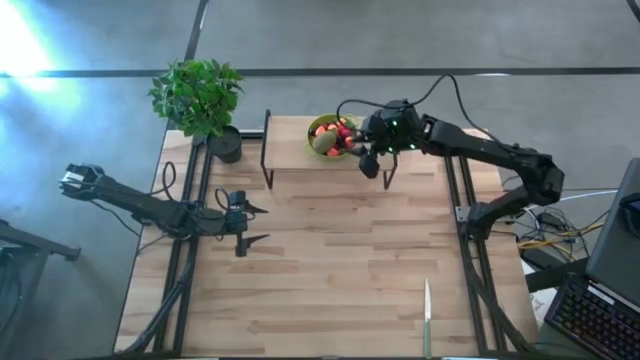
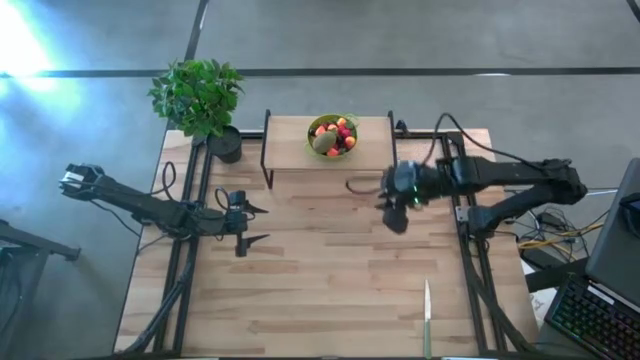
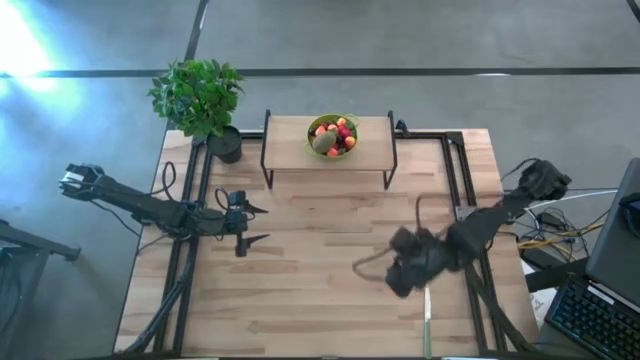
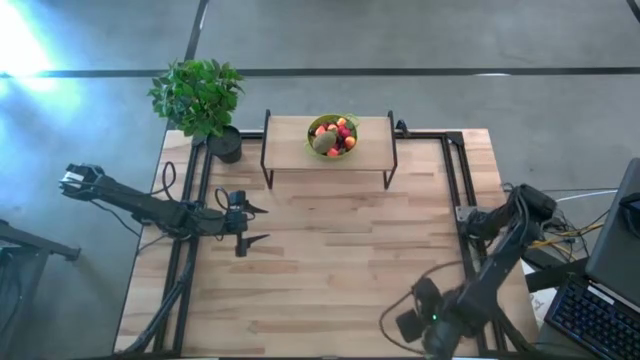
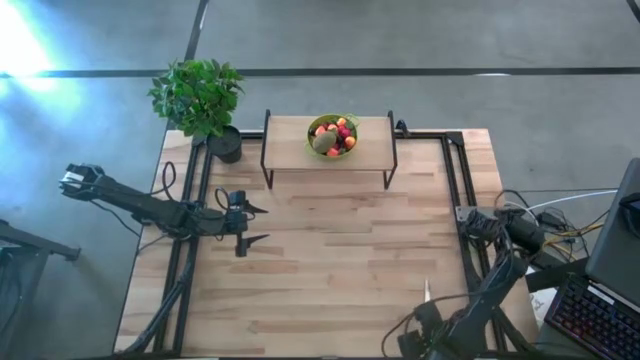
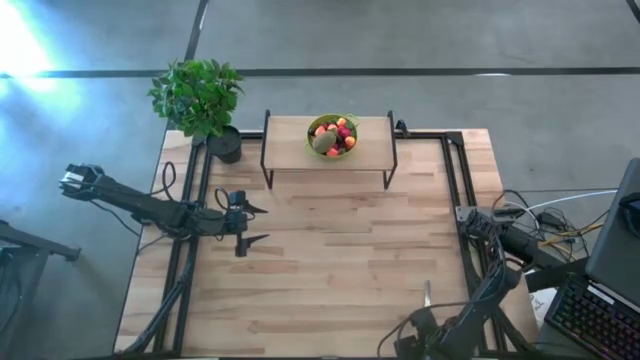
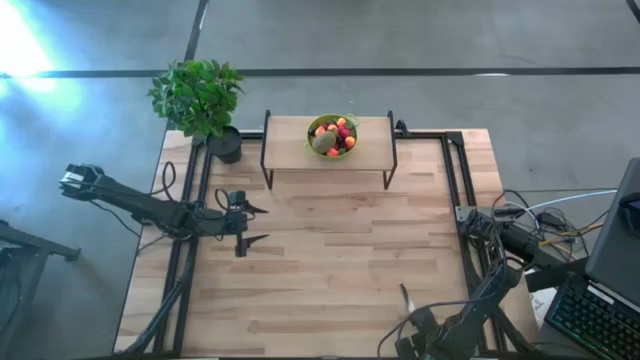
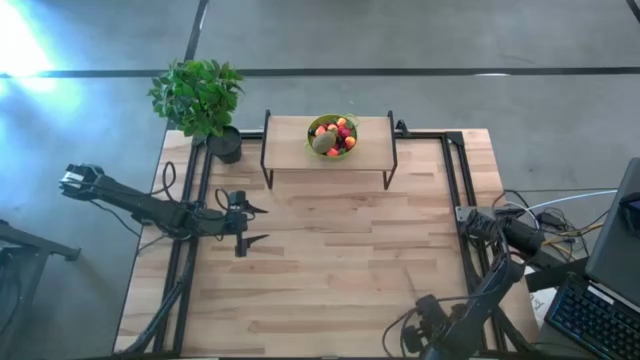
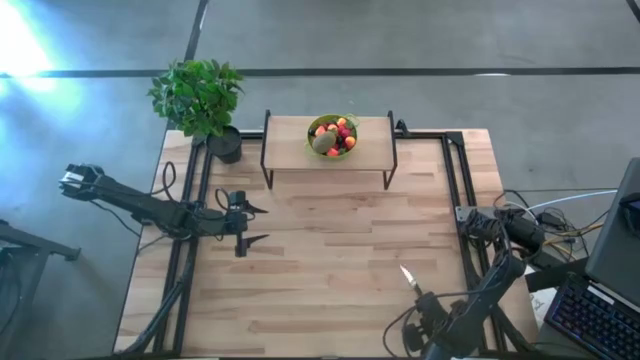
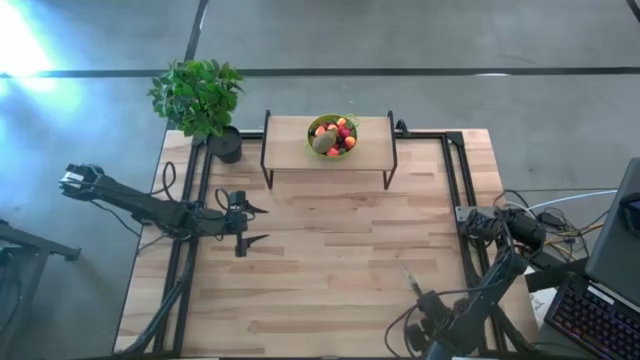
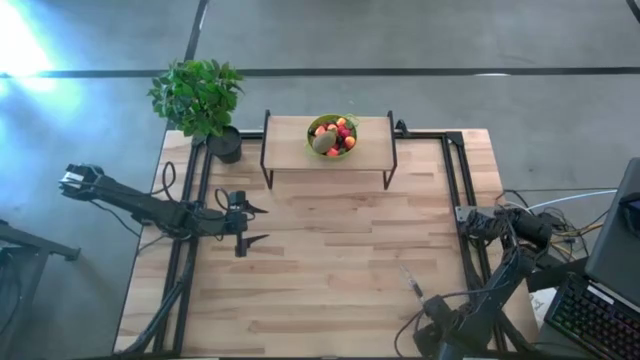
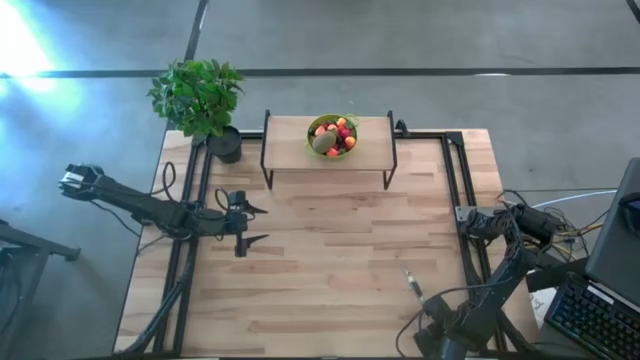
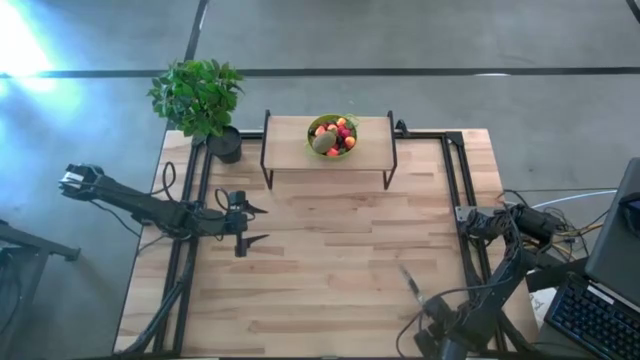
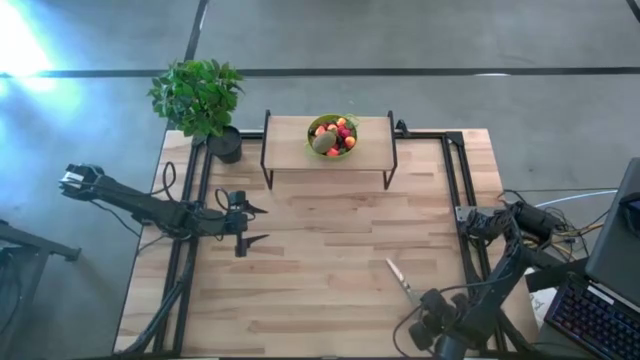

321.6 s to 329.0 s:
Task: Pick & Place Fruit
Put the green knife on the shelf

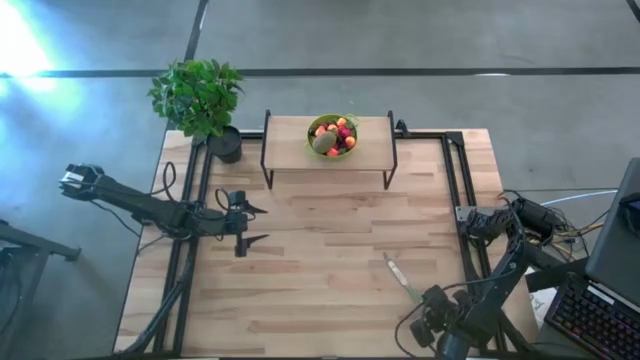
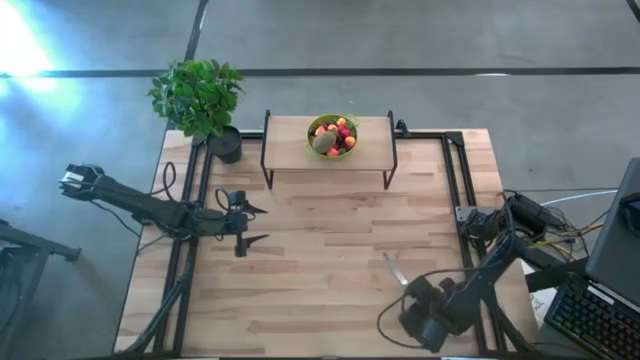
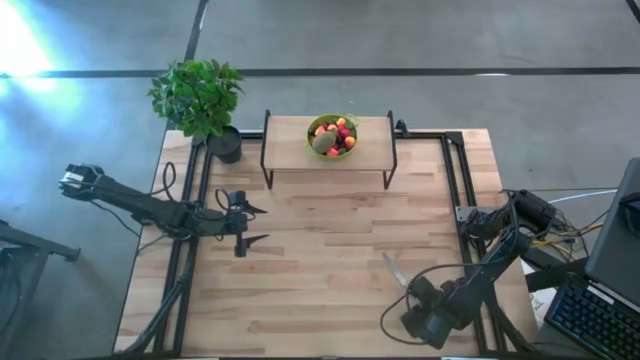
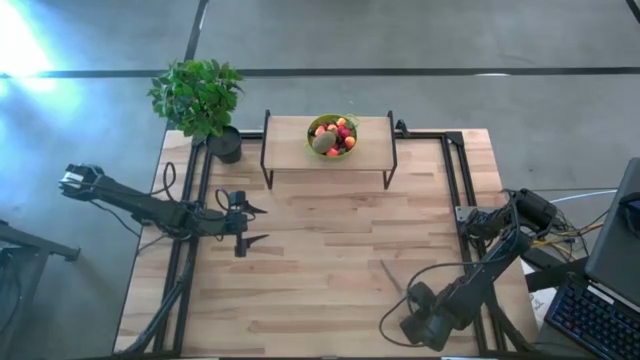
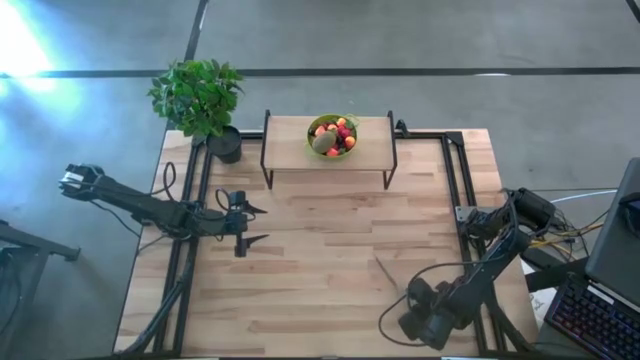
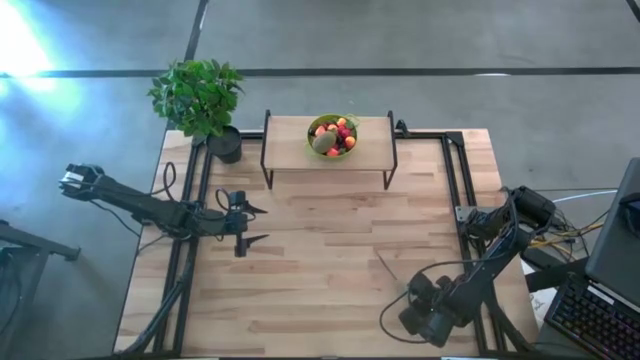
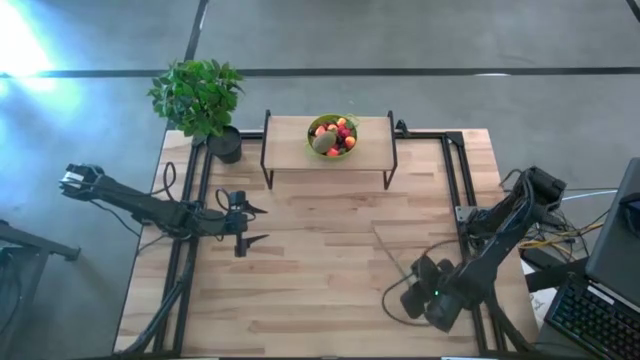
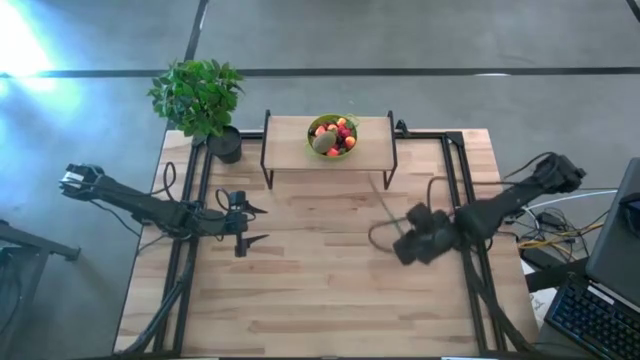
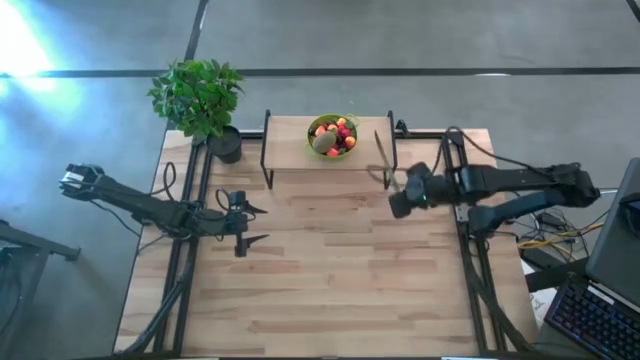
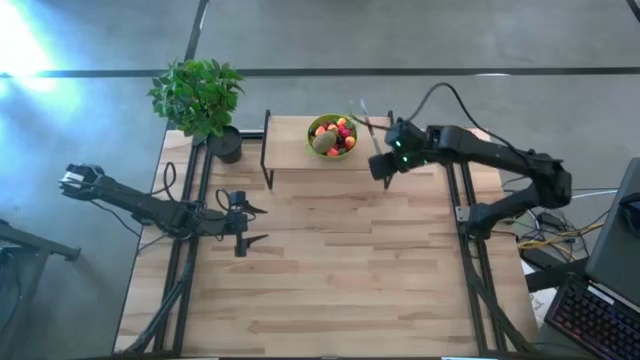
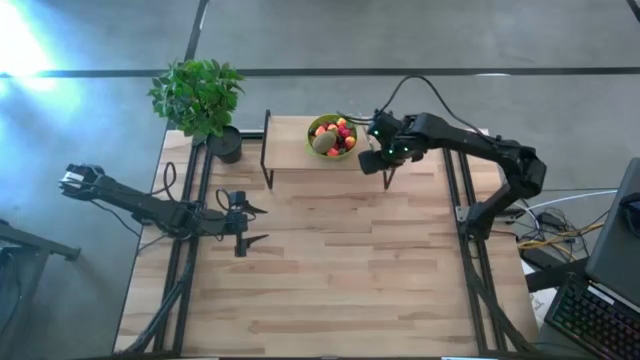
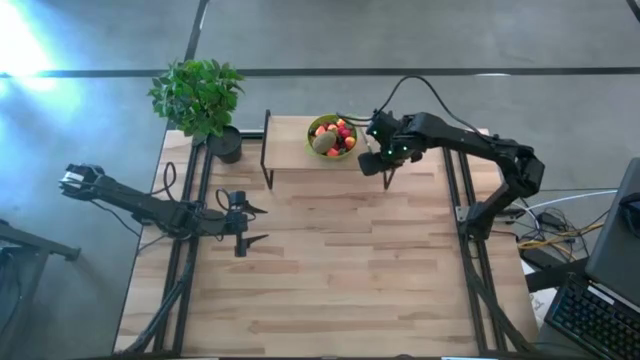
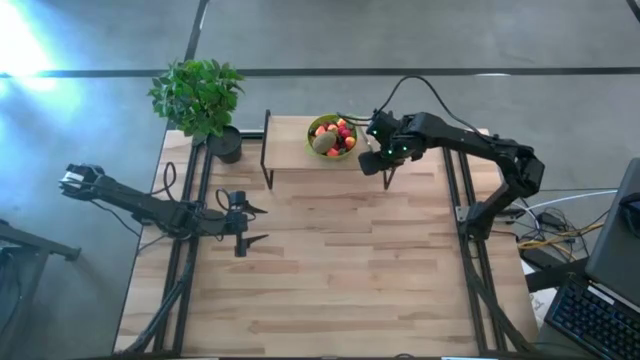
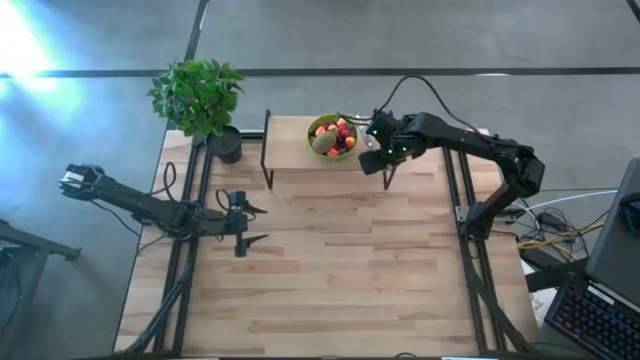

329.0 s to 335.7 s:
Put the green knife on the shelf

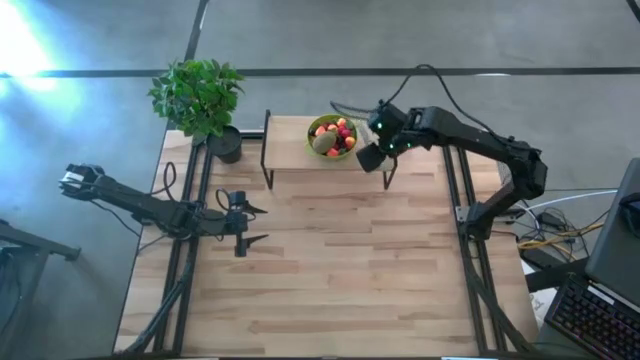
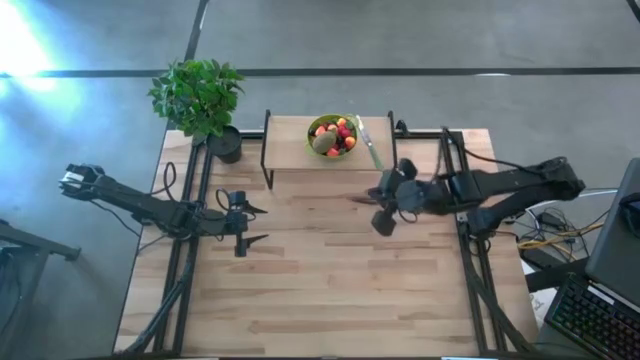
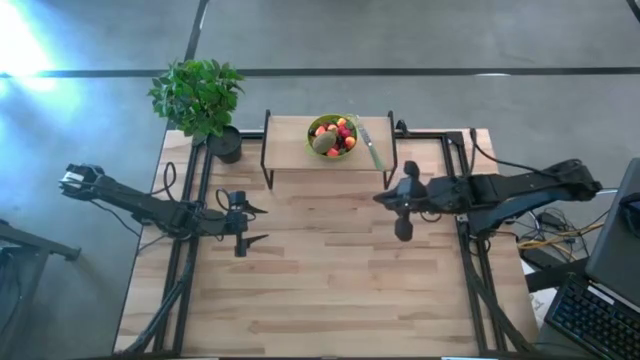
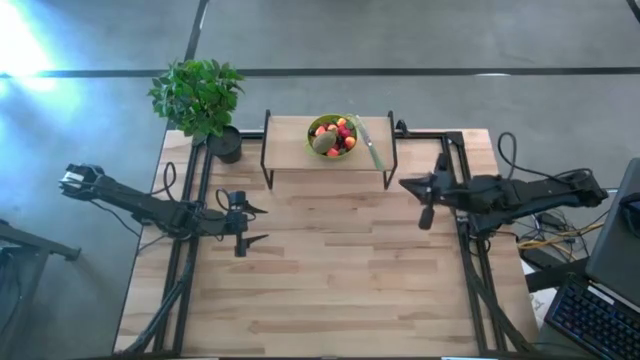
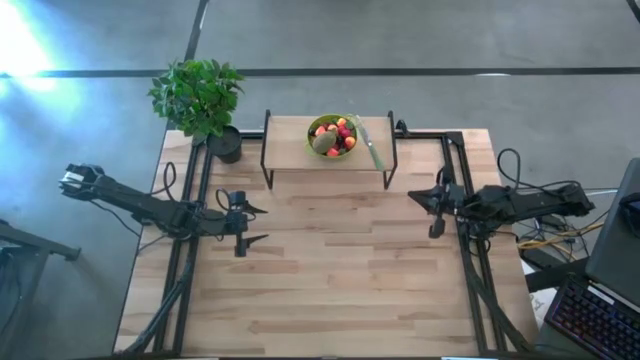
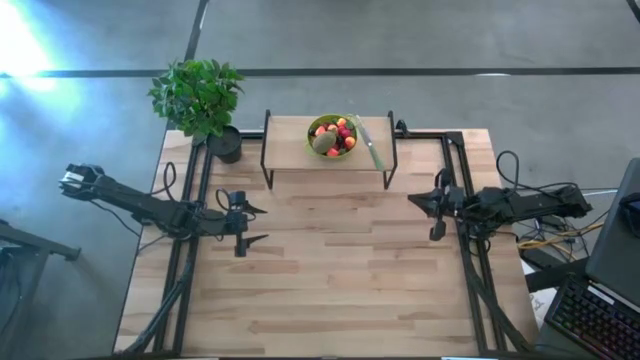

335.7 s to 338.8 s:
Return to Home Position

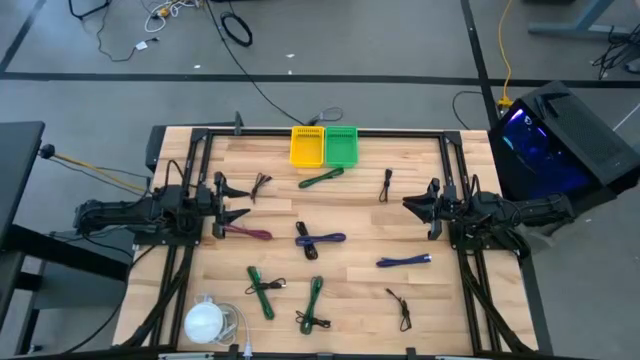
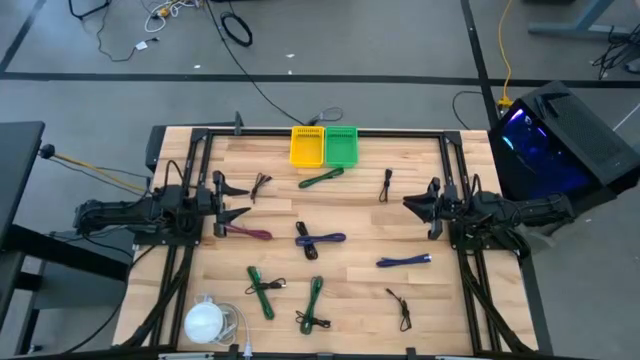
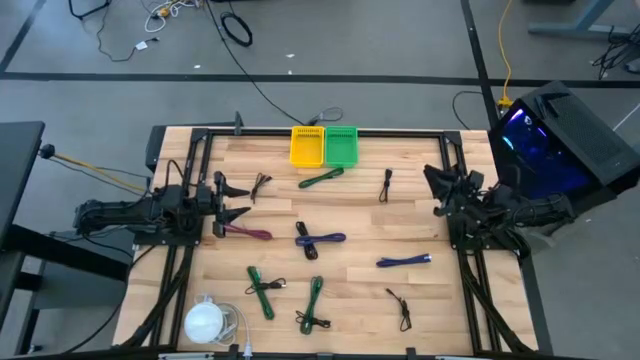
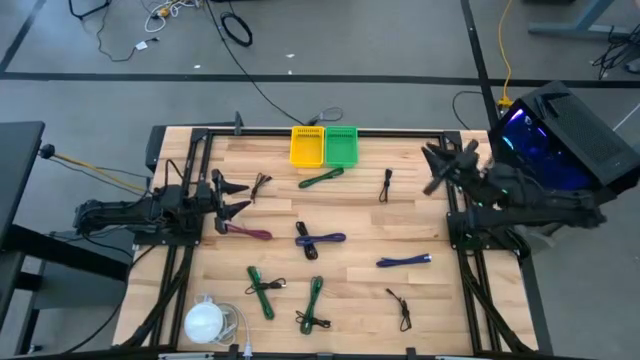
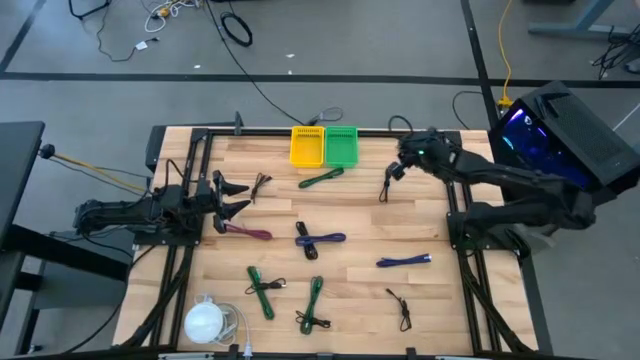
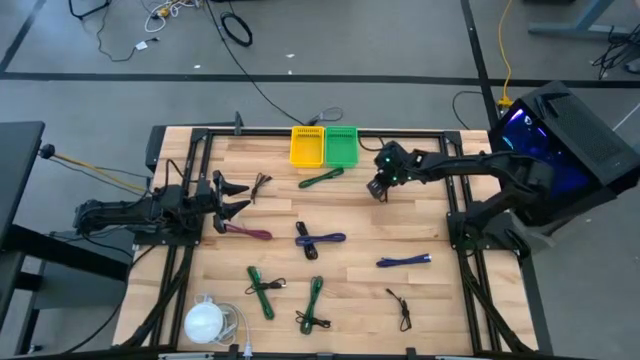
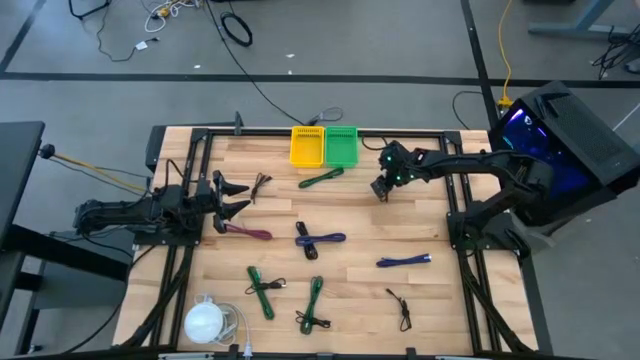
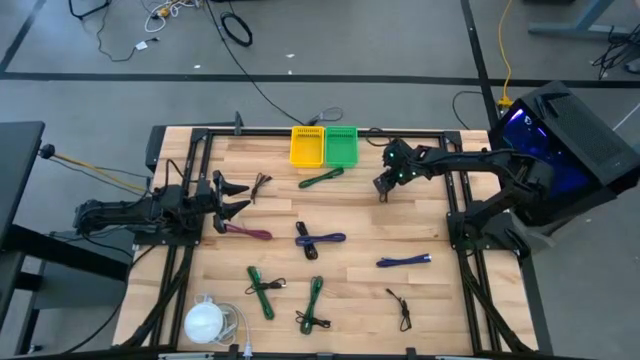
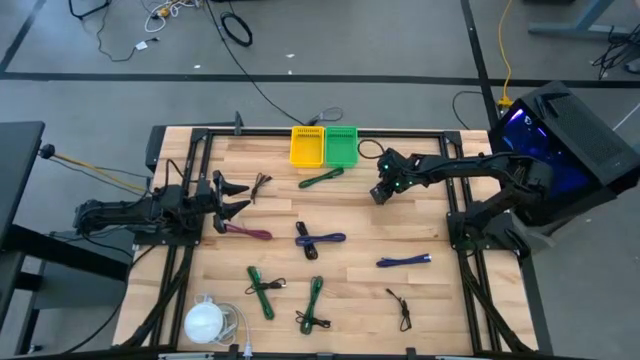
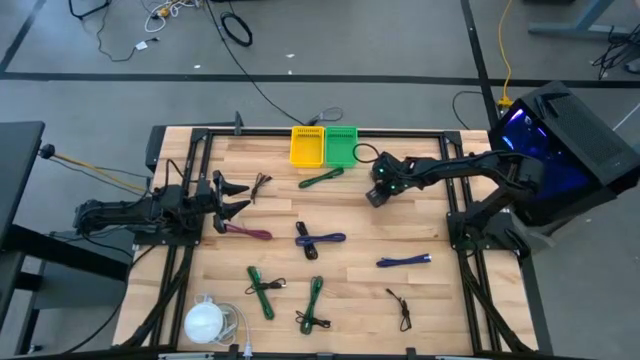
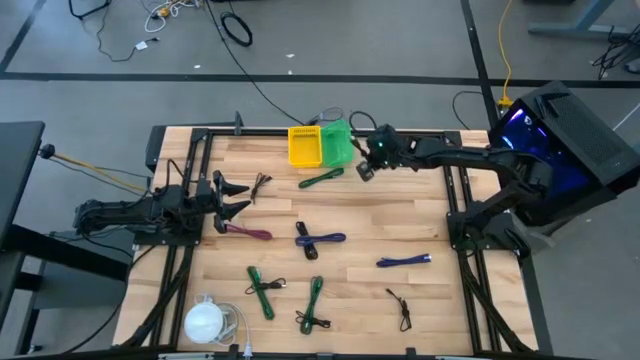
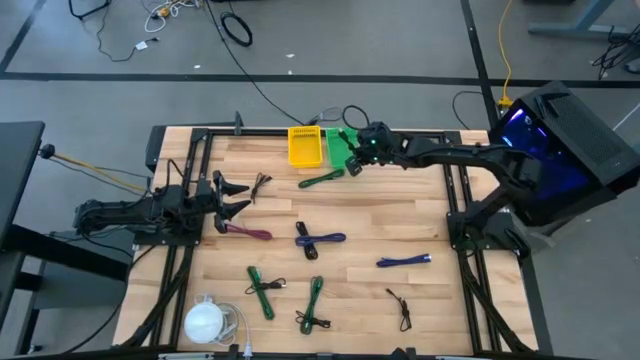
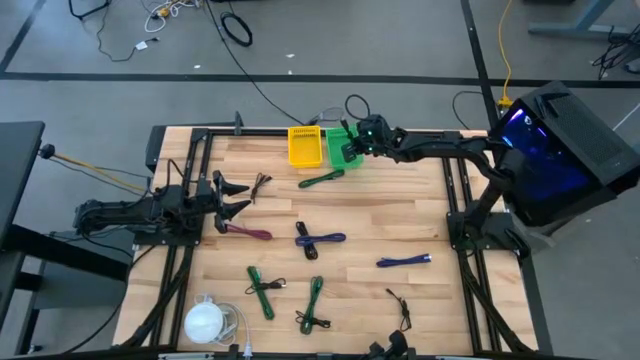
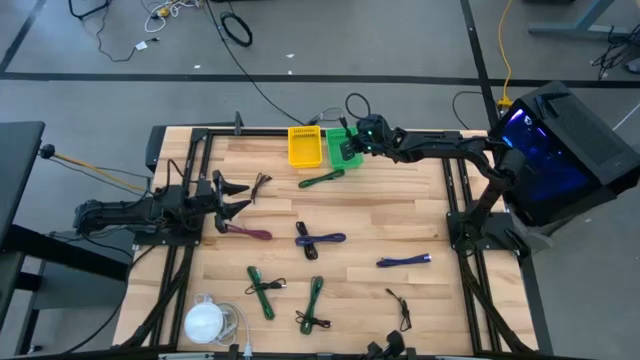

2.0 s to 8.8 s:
Task: Pick & Place USB Port
Put the black usb cable into the green bin
